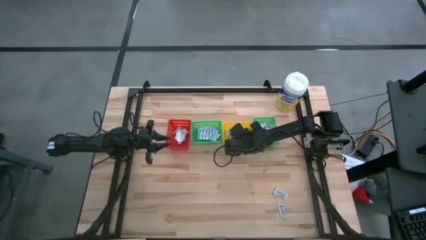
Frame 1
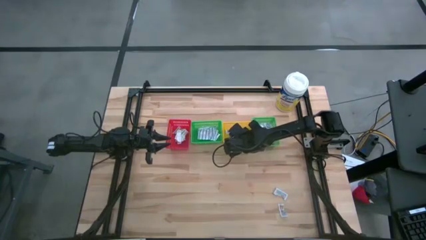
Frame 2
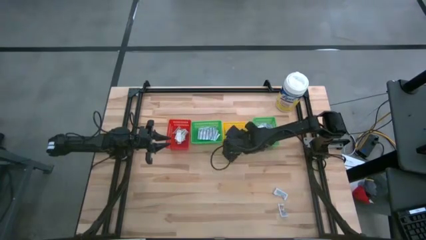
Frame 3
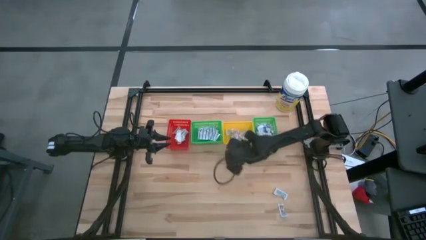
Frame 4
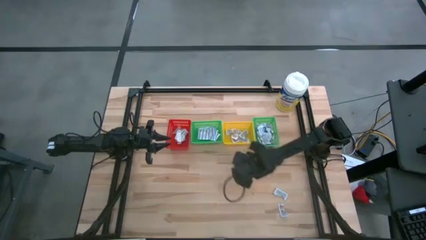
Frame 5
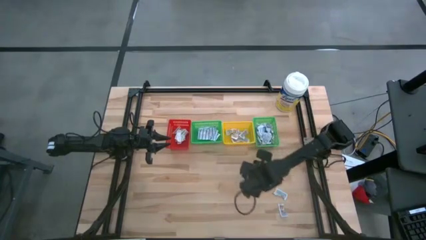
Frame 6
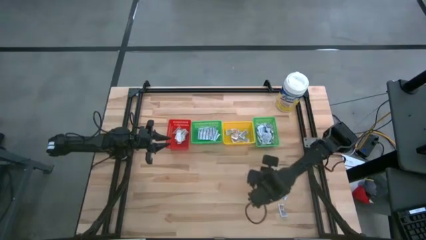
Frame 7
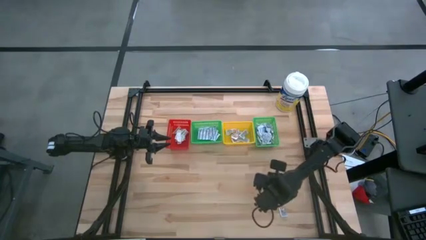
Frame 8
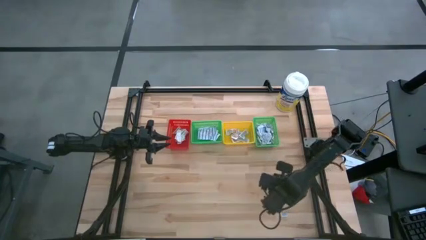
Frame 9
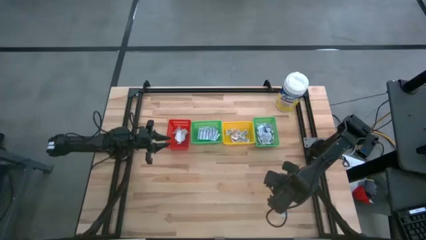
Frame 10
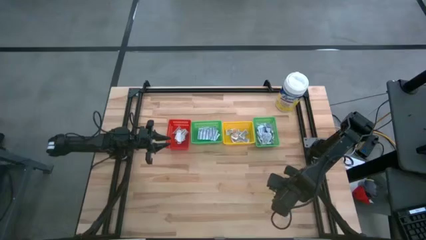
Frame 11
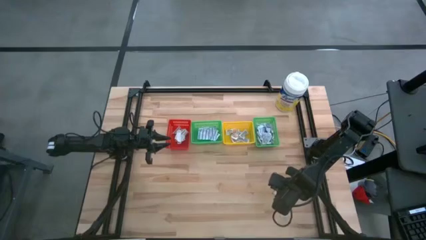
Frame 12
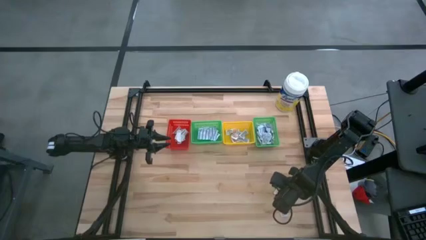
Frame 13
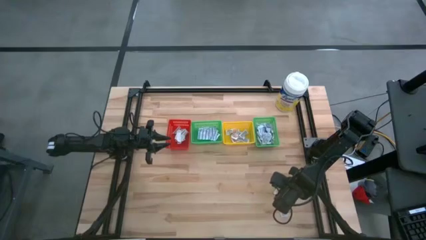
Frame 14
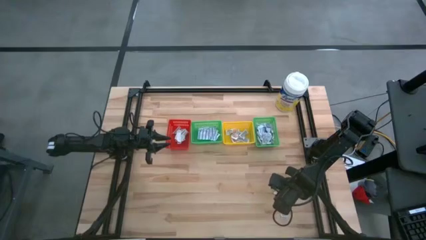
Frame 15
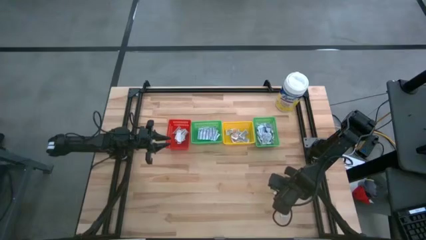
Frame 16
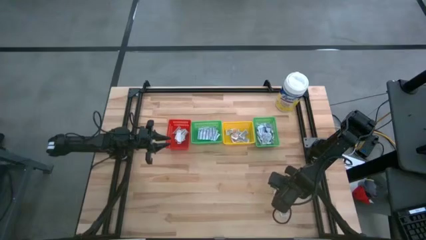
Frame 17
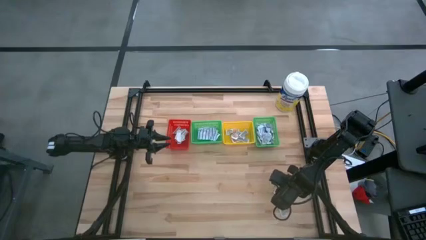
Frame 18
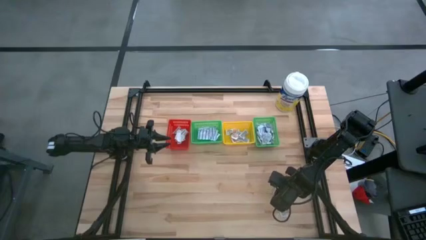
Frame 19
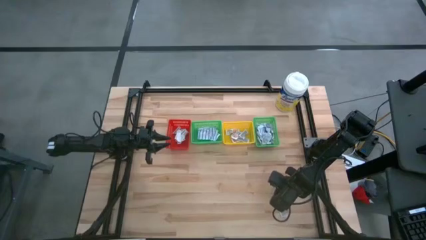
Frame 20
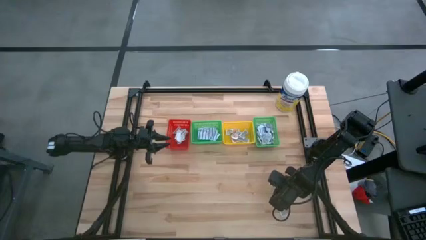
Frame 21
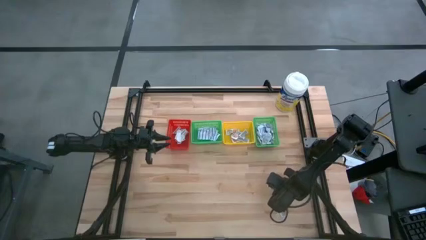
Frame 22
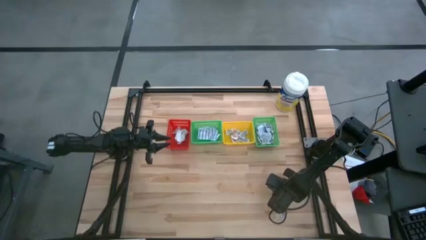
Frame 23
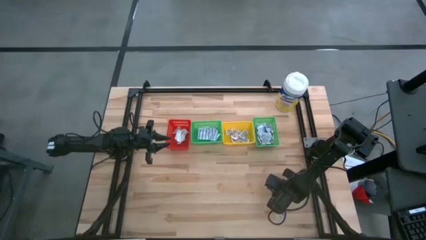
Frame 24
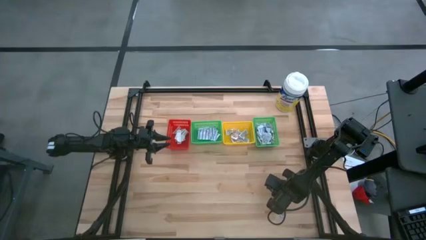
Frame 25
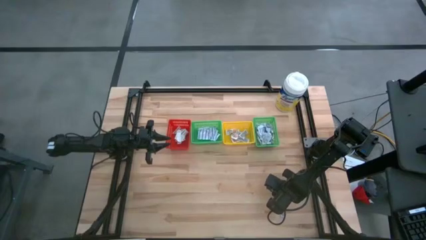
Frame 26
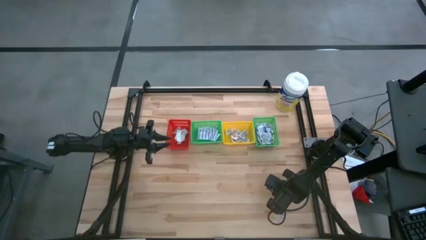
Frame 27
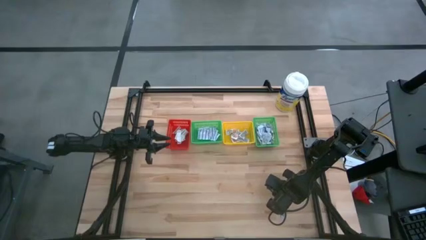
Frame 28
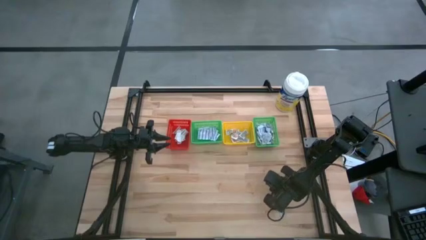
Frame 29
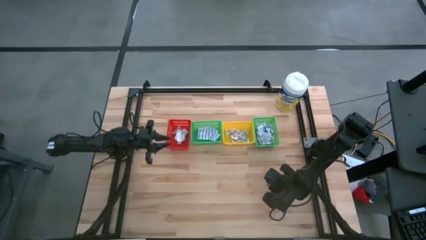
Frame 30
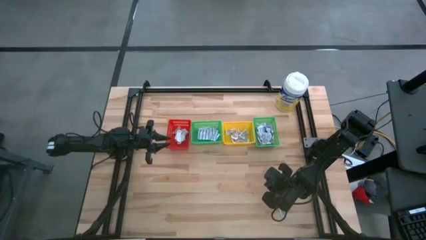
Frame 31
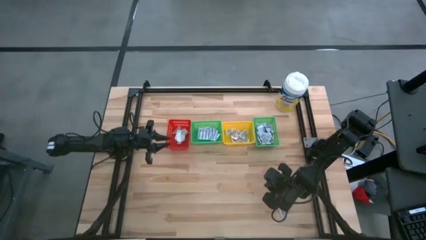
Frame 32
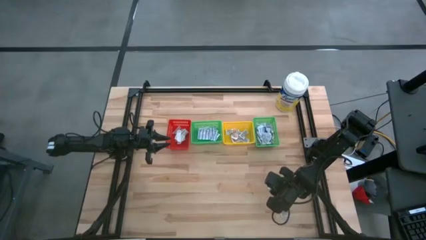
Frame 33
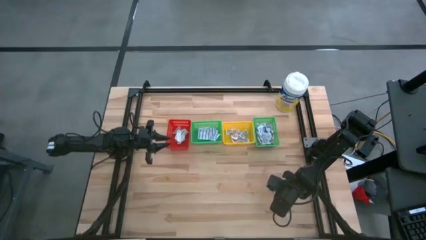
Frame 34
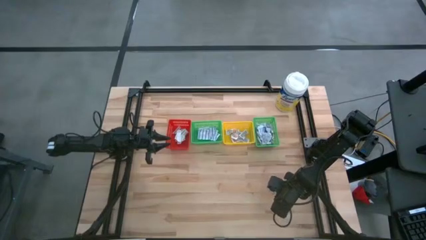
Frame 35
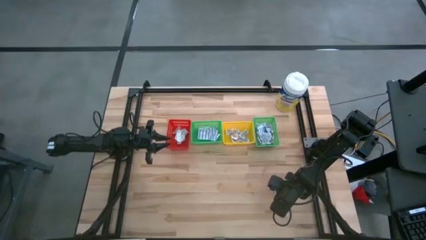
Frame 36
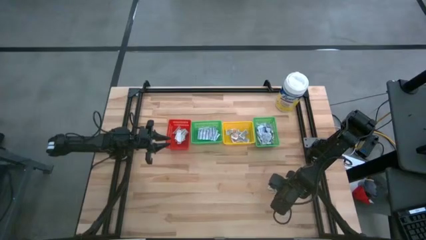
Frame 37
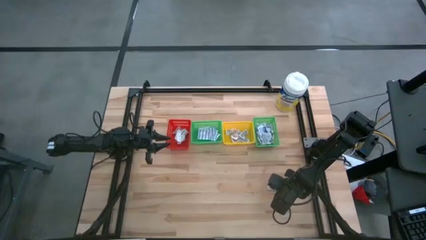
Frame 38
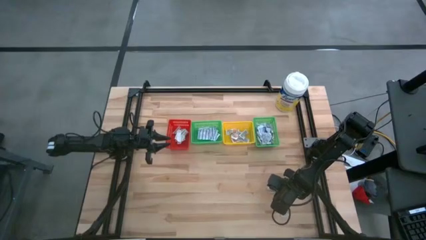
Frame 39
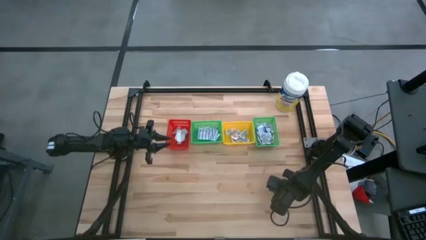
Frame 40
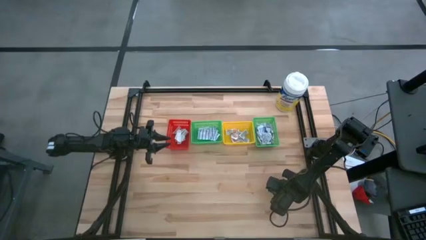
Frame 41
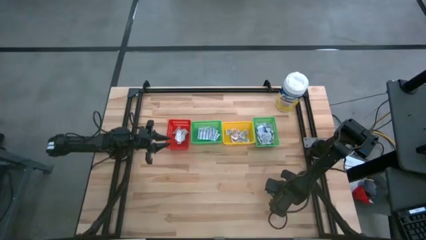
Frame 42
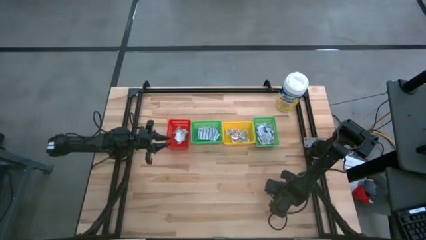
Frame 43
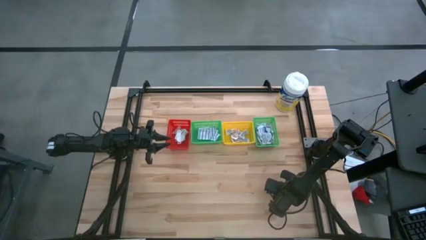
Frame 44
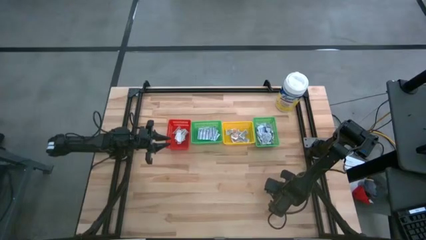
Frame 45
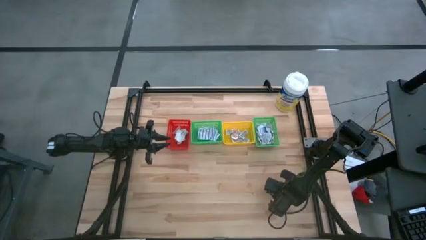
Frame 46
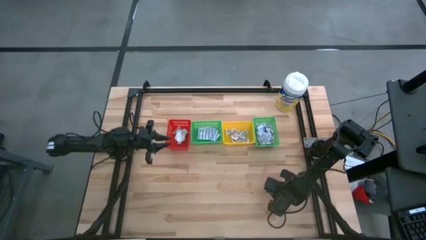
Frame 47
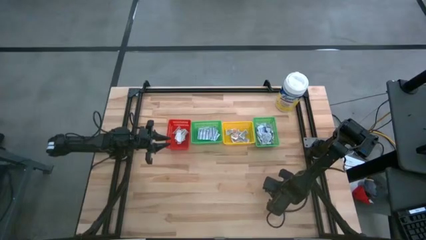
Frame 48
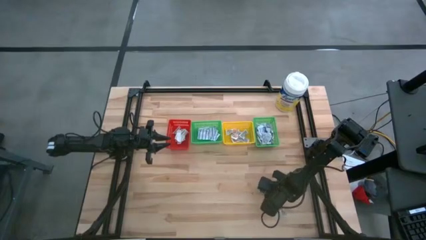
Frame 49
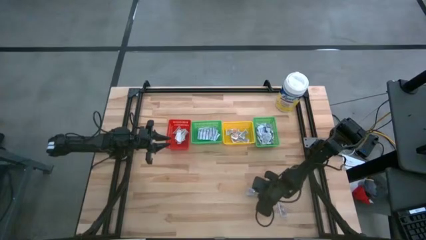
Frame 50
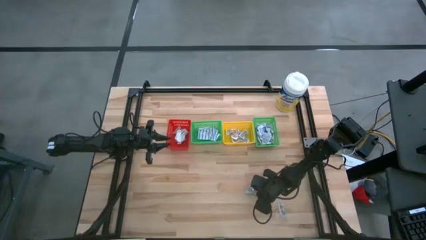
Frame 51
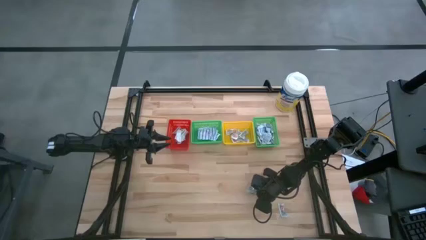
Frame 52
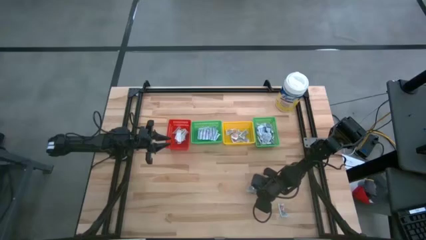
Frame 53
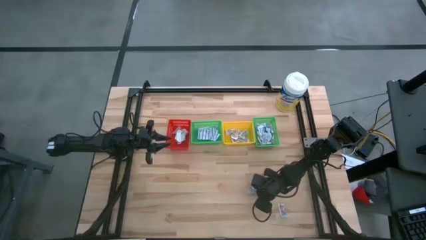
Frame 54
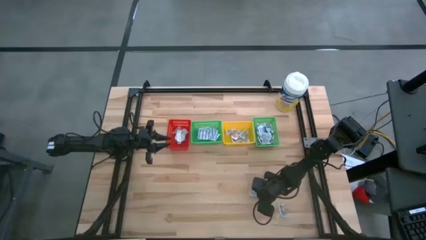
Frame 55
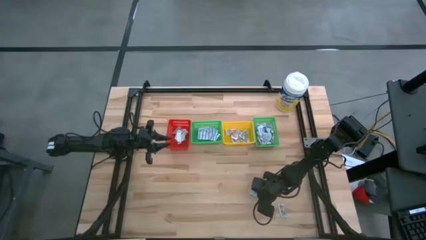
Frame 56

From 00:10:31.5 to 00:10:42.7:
Task: Pick & Place First Aid Supplies
Put the orange ointment pack into the yellow bin

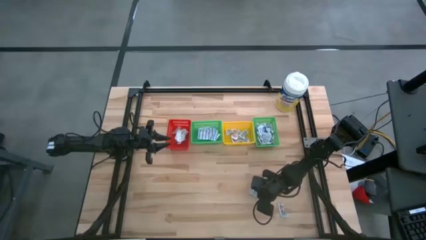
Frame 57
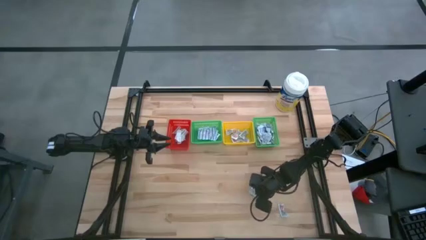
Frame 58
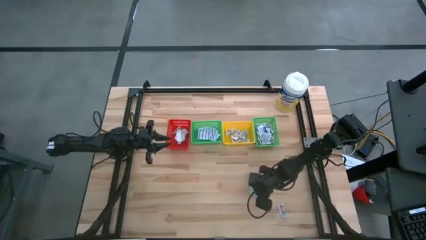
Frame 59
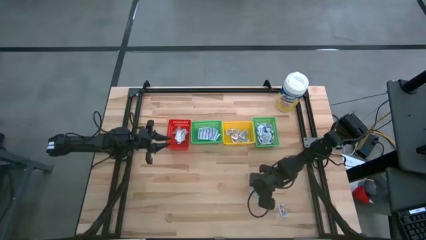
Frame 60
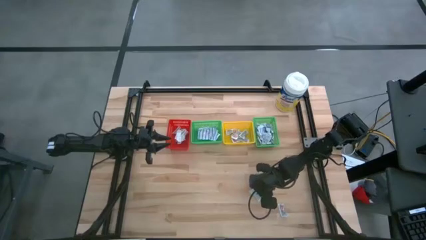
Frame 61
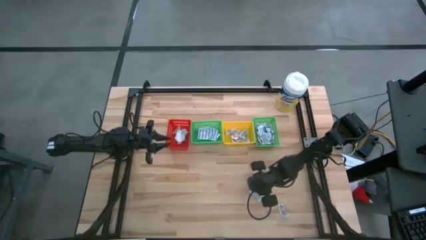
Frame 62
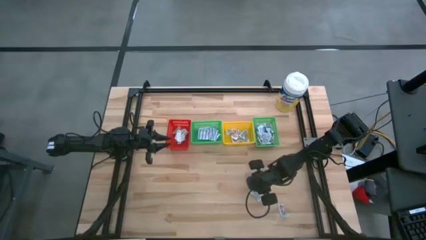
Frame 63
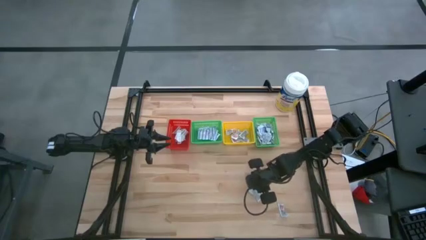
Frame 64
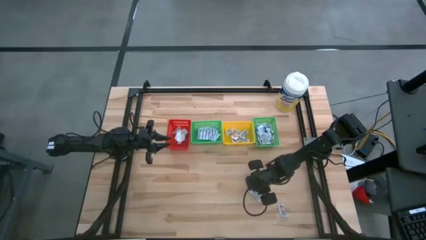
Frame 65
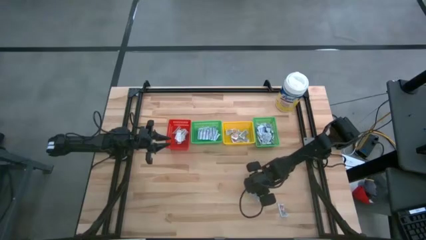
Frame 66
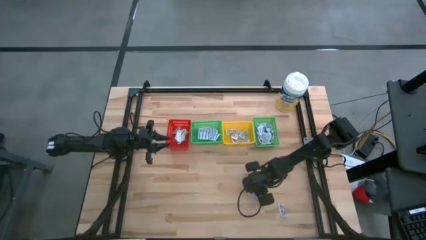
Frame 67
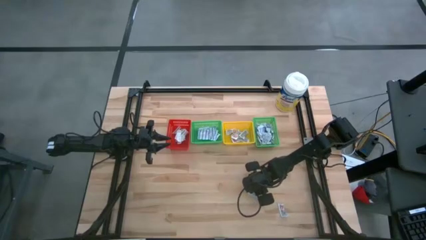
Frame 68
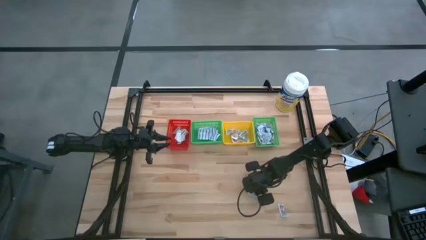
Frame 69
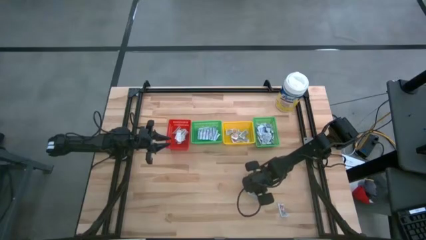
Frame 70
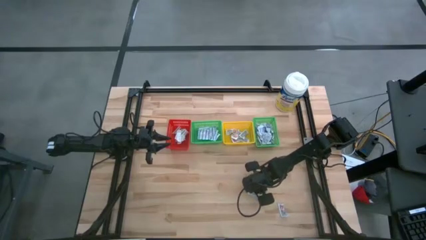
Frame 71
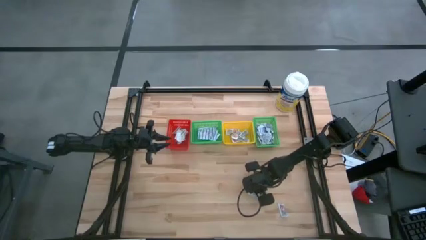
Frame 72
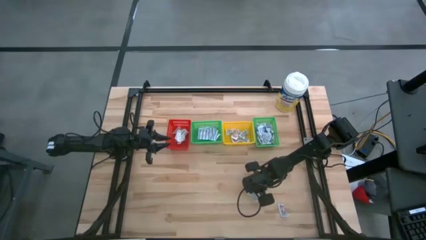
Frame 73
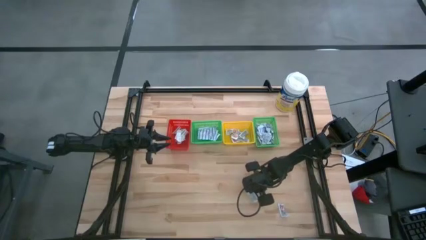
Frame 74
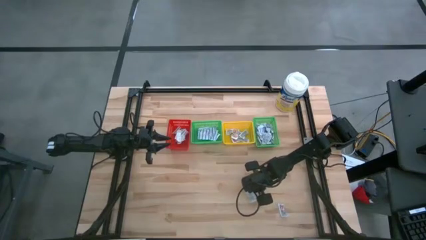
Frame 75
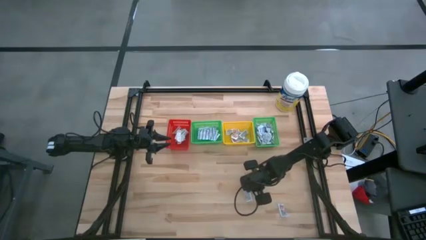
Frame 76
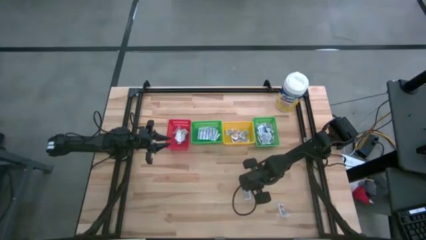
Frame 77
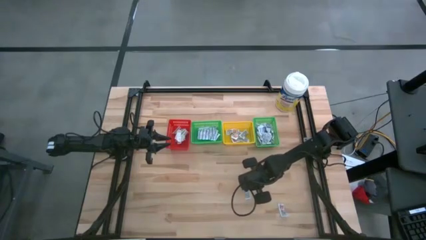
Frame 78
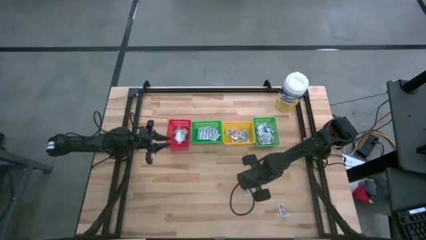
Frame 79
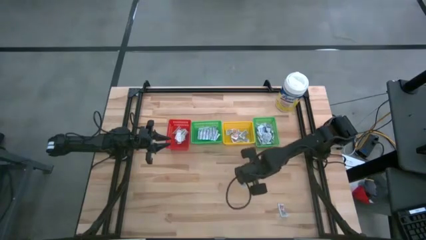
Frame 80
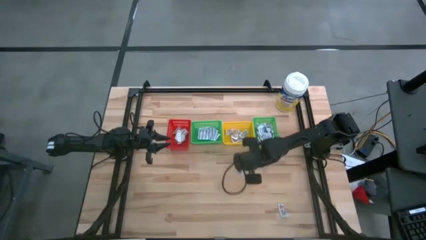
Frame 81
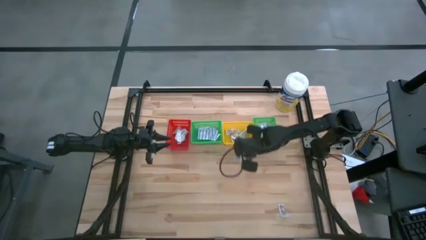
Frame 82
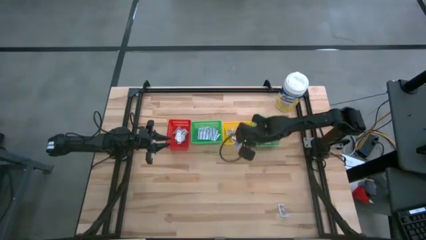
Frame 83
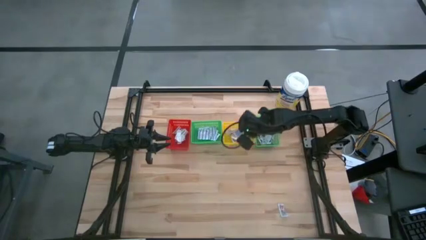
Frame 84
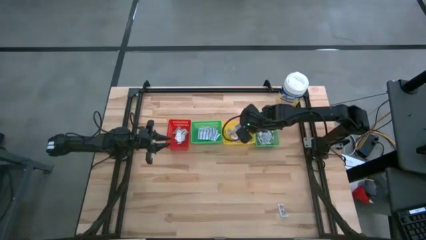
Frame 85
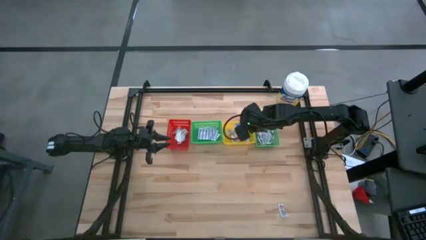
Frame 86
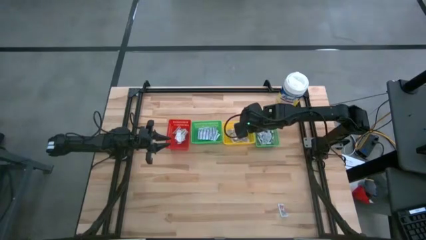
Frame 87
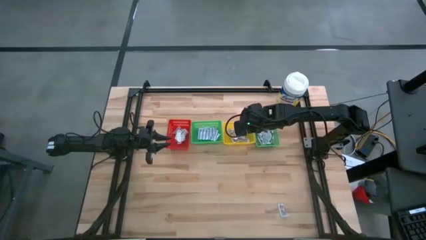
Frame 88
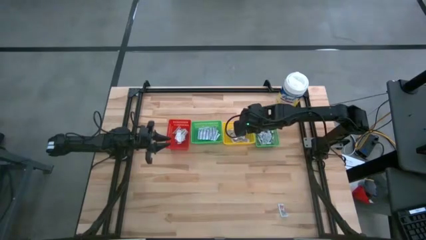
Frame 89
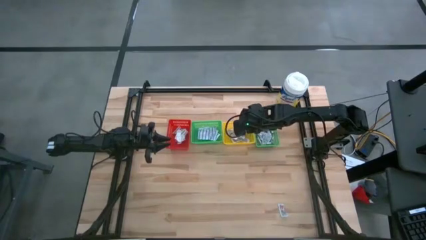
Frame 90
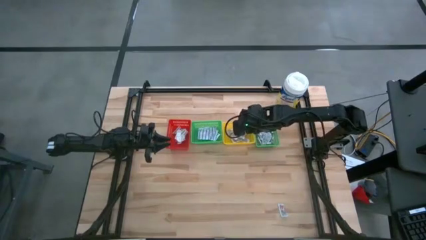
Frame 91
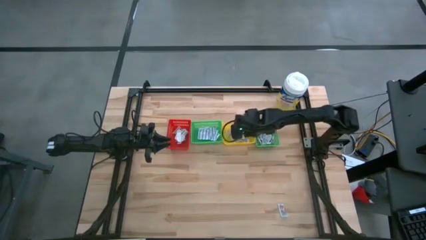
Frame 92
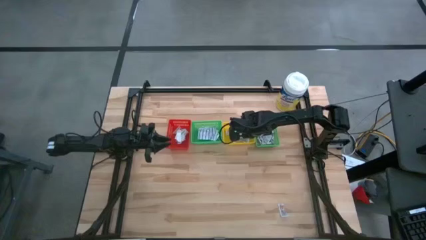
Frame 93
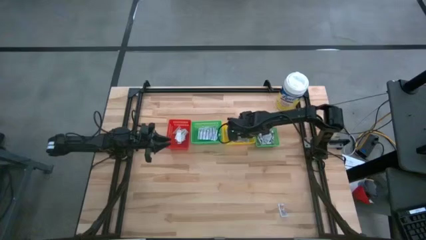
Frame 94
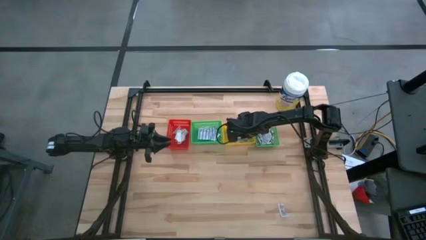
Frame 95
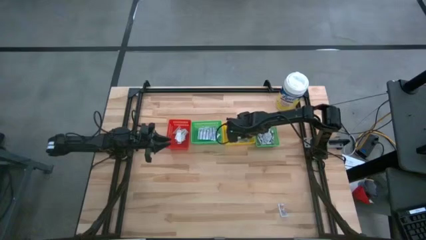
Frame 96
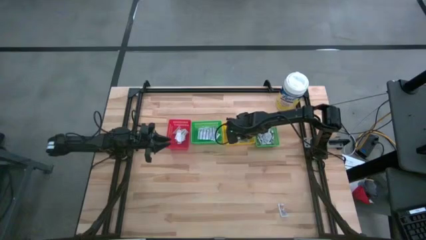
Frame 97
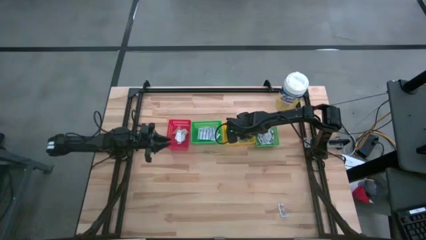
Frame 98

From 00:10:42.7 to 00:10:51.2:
Put the orange ointment pack into the yellow bin
